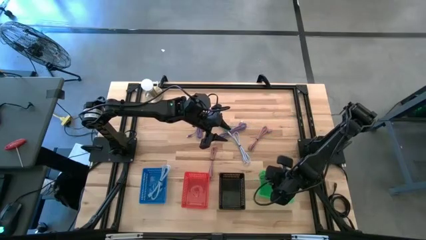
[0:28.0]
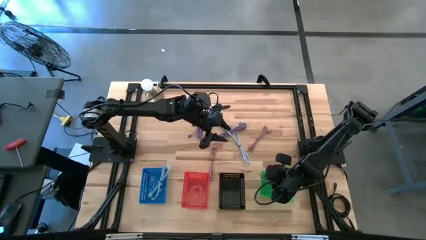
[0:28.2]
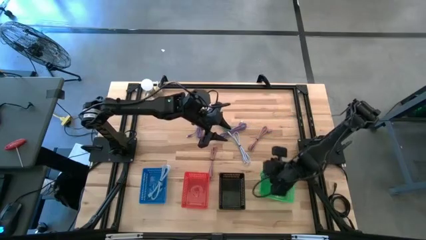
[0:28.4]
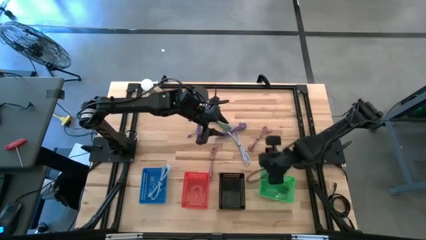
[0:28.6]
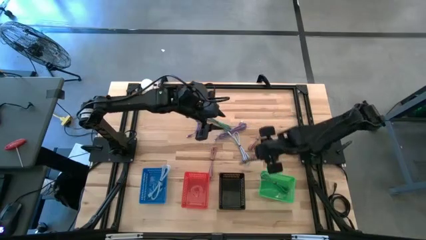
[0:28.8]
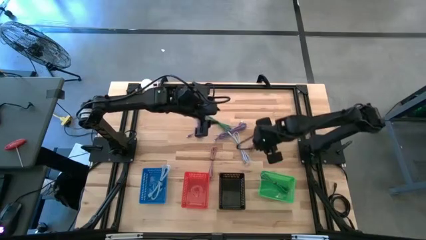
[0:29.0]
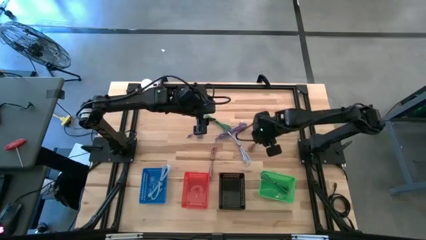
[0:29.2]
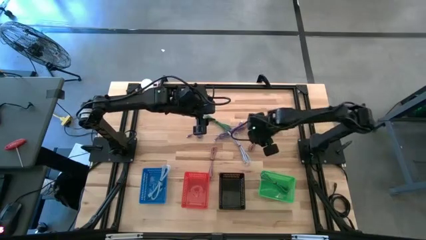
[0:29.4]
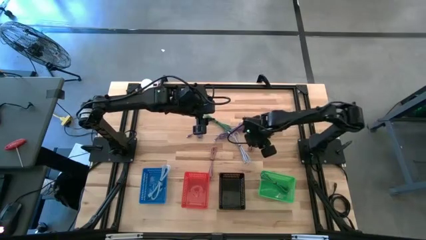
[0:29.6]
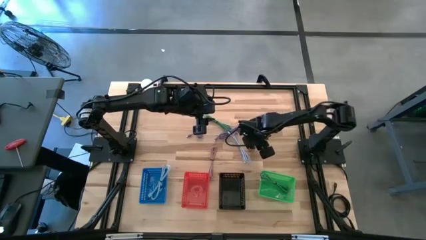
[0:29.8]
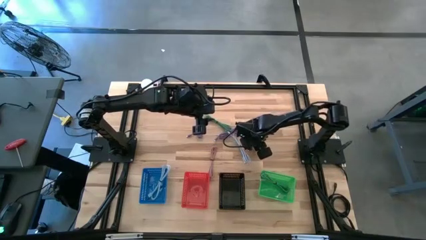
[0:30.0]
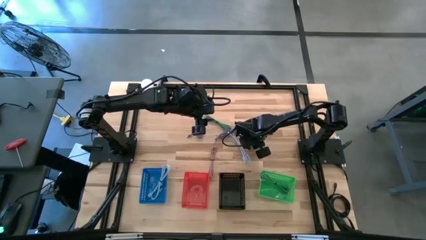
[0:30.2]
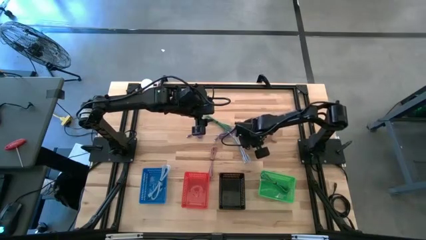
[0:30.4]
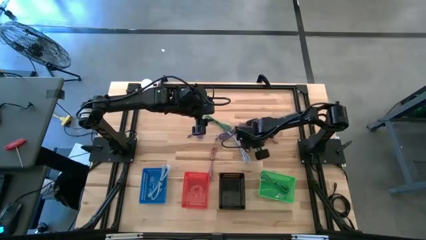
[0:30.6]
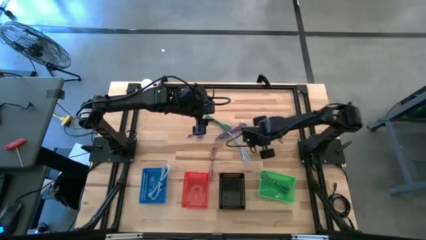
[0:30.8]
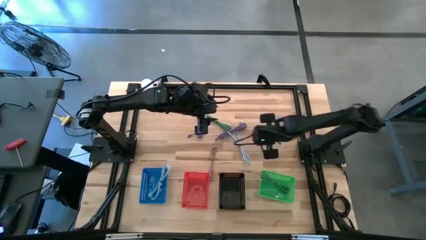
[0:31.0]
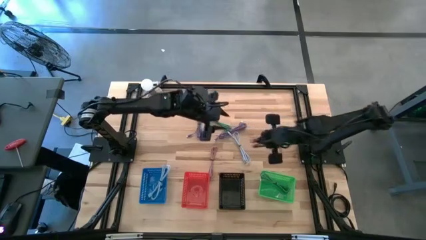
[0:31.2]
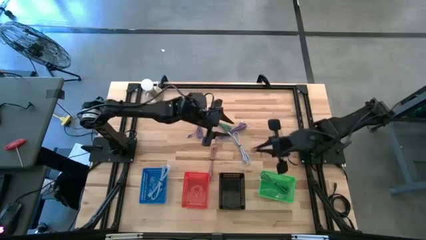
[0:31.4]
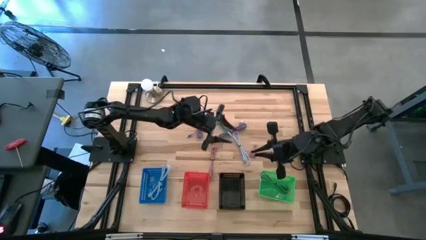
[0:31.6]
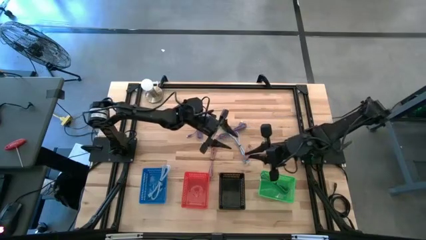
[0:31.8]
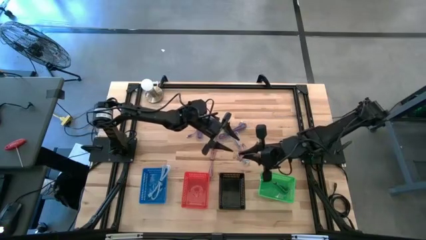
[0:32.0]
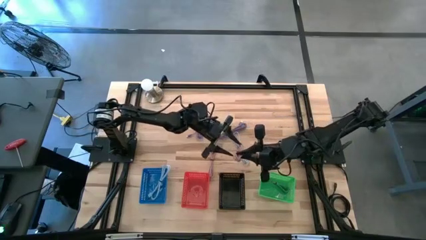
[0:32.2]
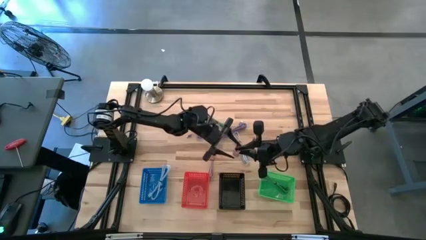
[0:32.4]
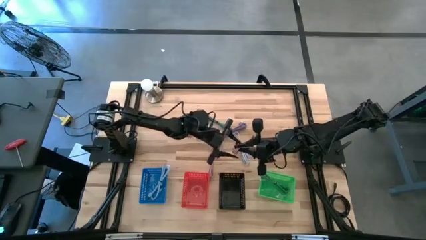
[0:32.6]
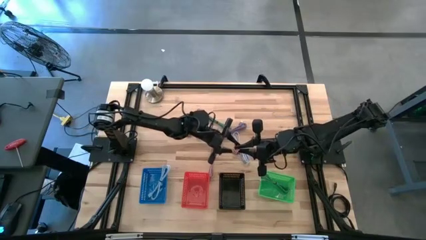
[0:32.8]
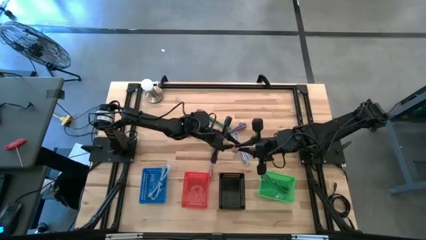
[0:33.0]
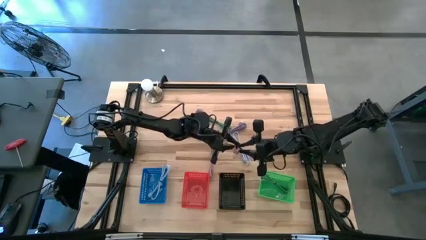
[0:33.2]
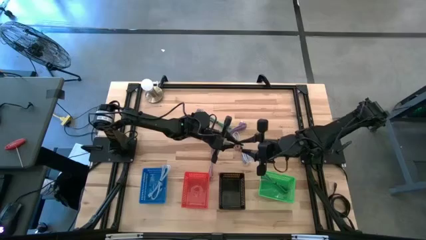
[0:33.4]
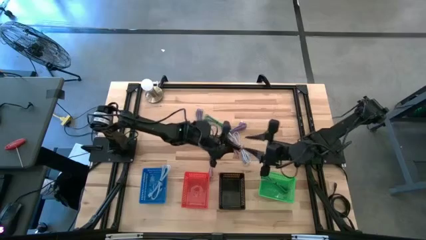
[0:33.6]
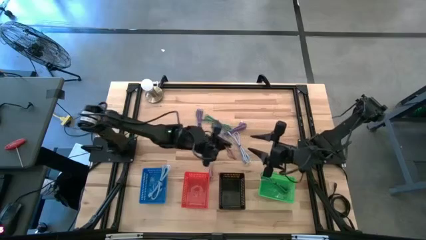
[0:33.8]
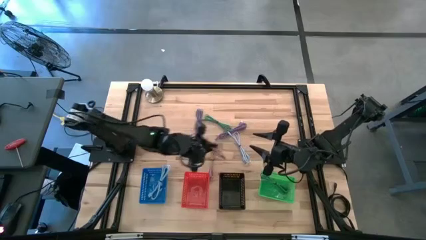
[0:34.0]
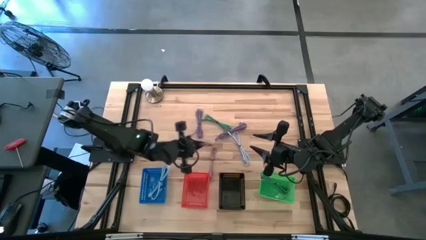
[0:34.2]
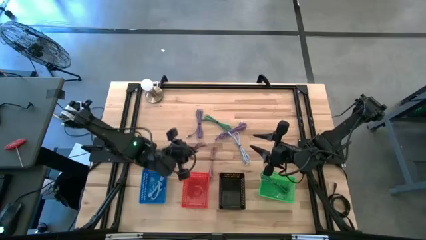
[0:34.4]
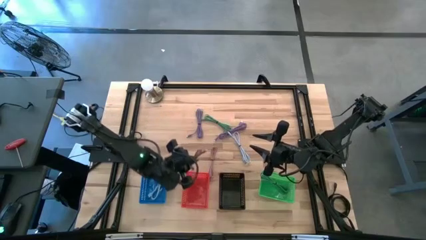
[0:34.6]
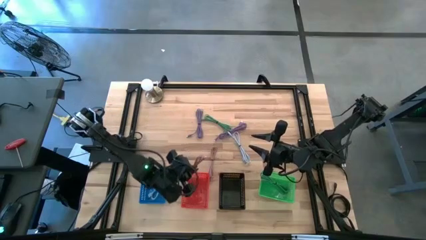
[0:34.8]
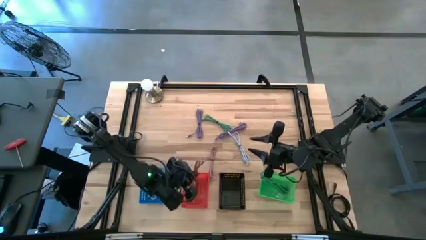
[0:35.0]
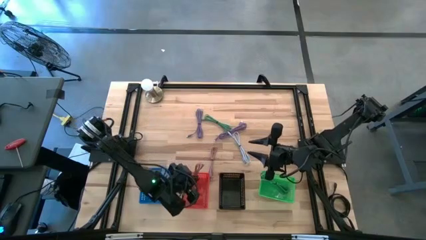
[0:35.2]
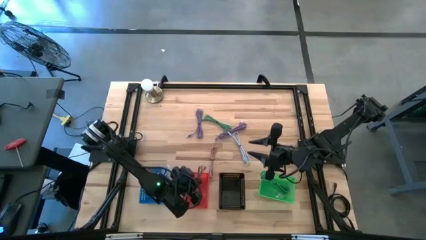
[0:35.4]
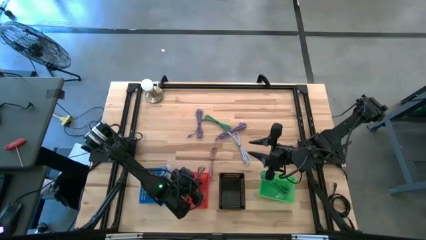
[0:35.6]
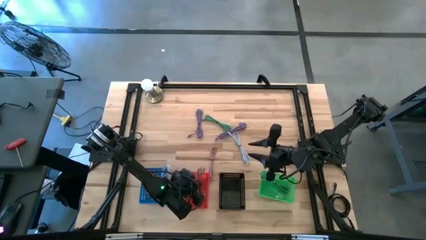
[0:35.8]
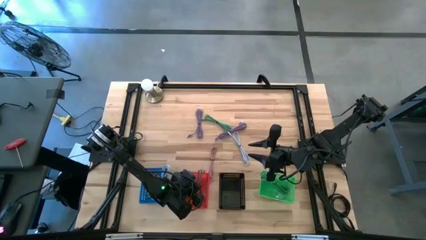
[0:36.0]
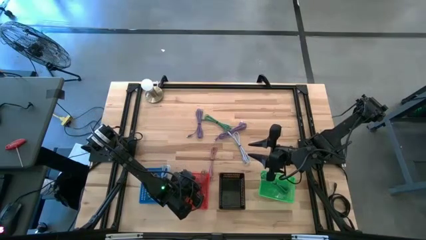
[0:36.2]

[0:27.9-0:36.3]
Task: Pick & Place USB Port
Put the right pink charger cable into the red bin

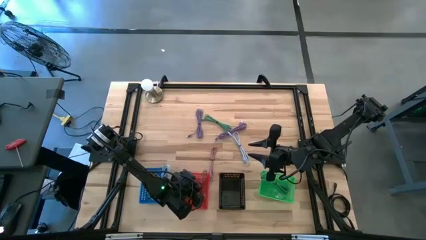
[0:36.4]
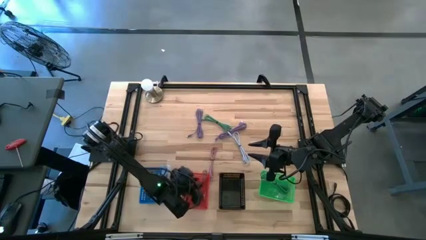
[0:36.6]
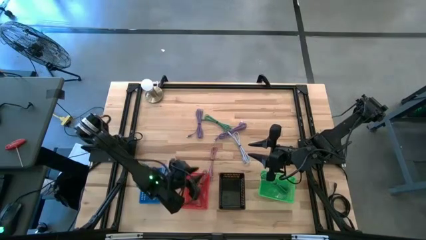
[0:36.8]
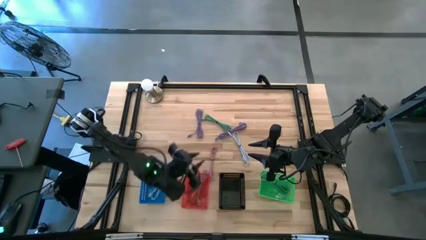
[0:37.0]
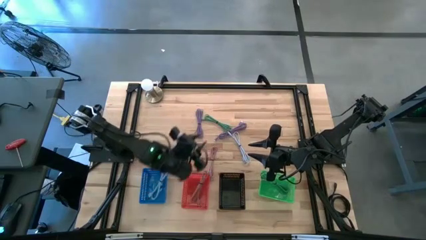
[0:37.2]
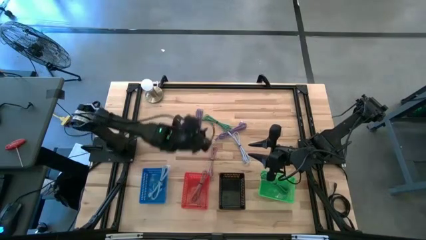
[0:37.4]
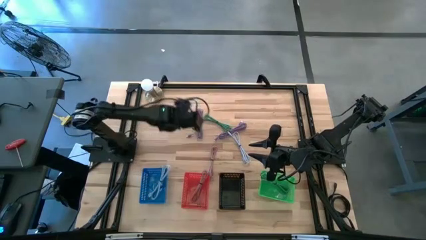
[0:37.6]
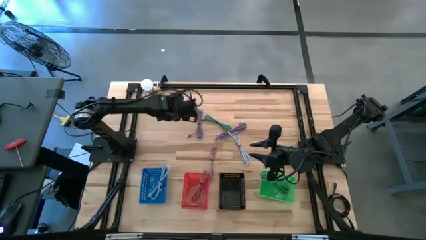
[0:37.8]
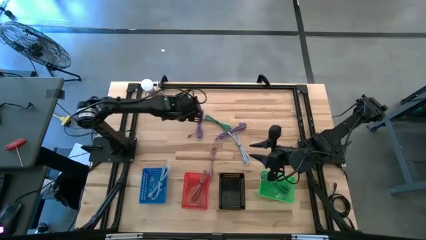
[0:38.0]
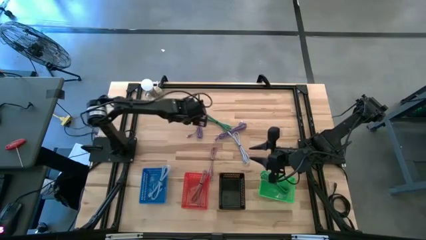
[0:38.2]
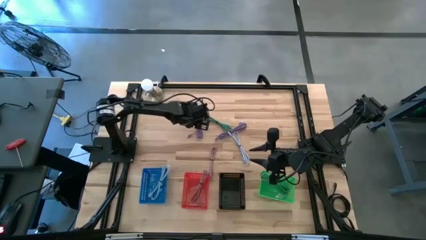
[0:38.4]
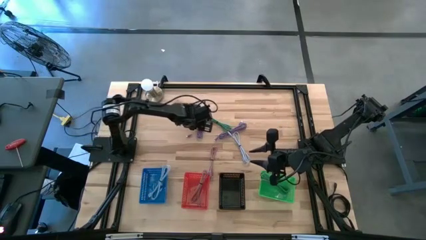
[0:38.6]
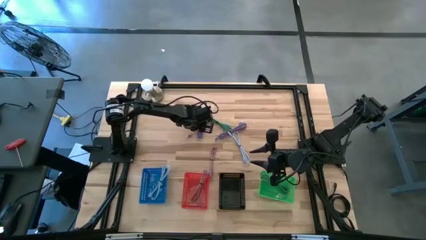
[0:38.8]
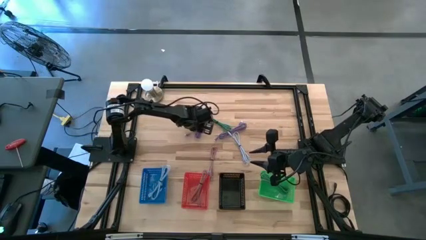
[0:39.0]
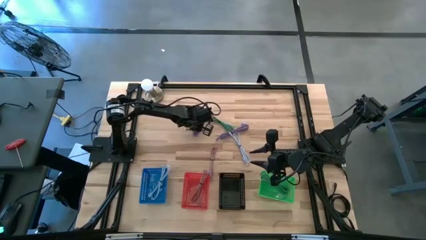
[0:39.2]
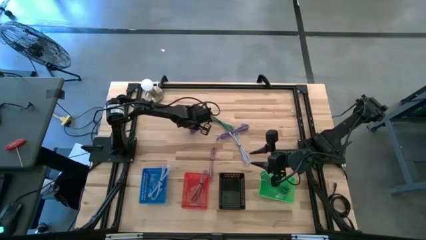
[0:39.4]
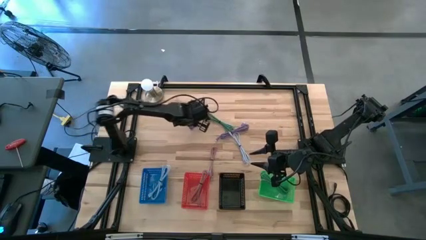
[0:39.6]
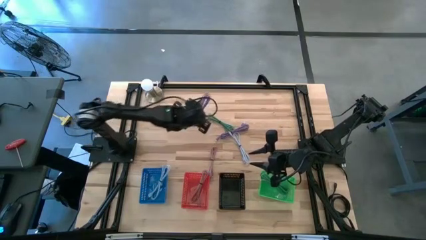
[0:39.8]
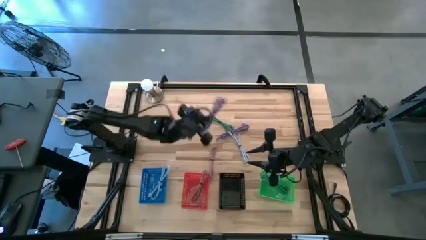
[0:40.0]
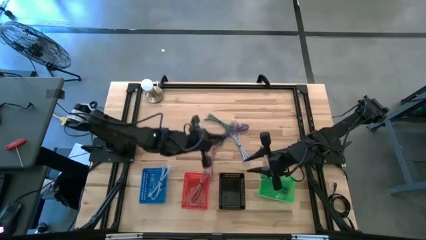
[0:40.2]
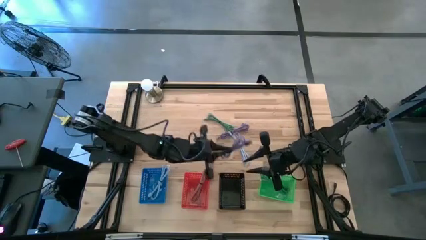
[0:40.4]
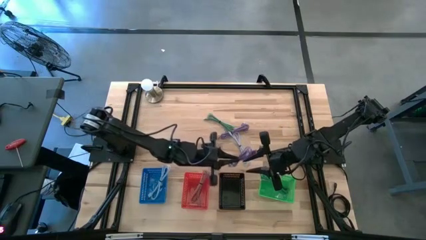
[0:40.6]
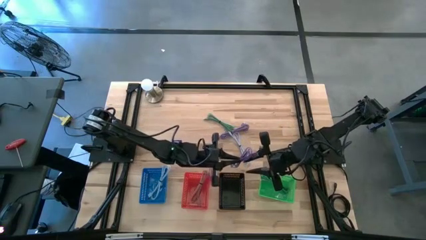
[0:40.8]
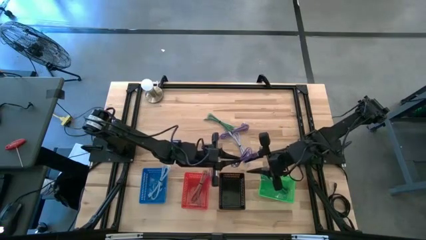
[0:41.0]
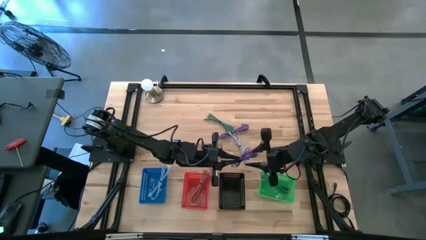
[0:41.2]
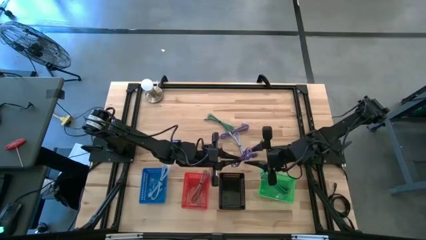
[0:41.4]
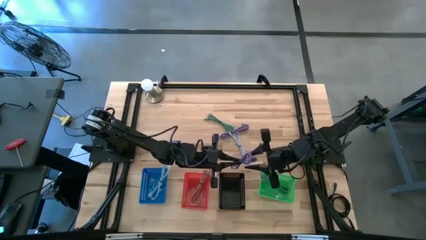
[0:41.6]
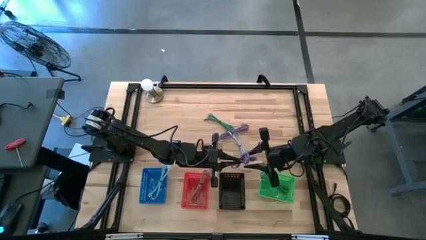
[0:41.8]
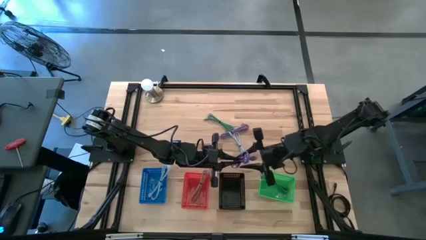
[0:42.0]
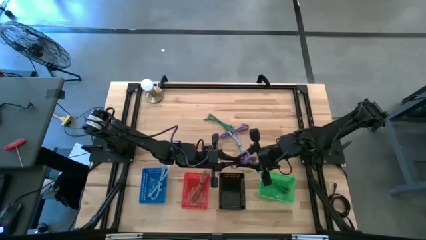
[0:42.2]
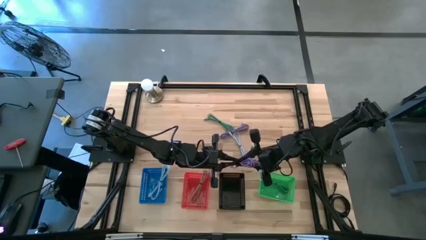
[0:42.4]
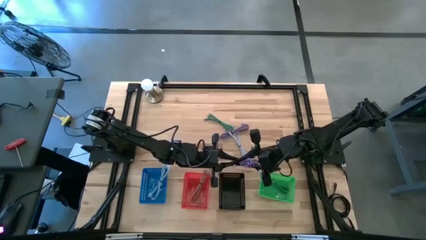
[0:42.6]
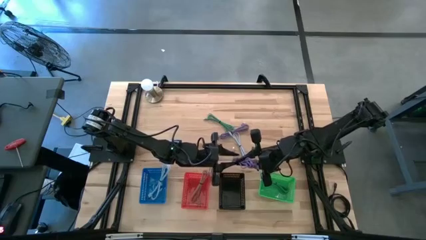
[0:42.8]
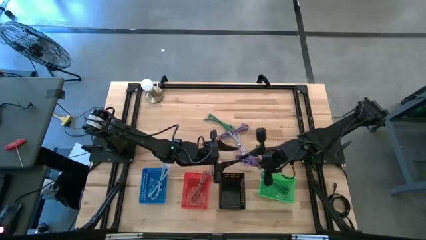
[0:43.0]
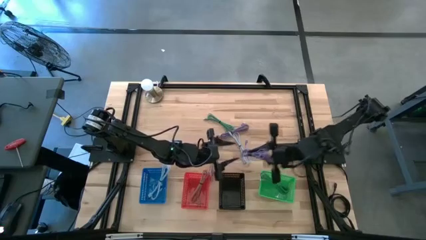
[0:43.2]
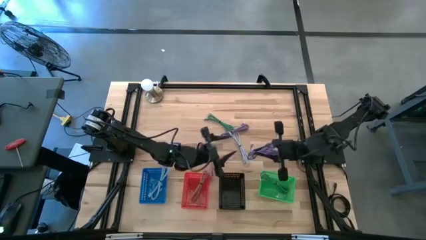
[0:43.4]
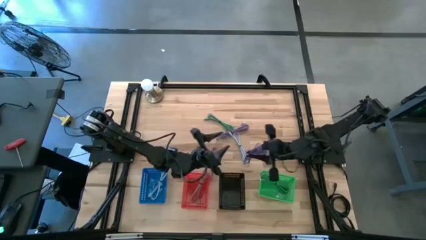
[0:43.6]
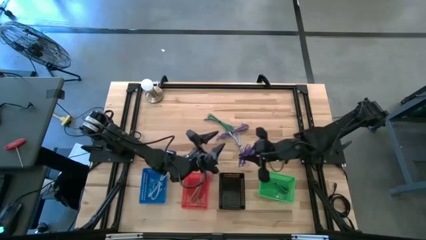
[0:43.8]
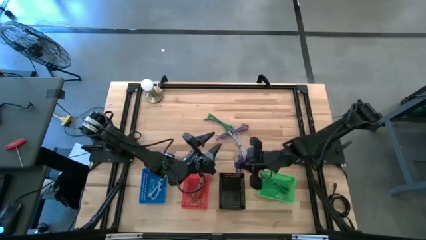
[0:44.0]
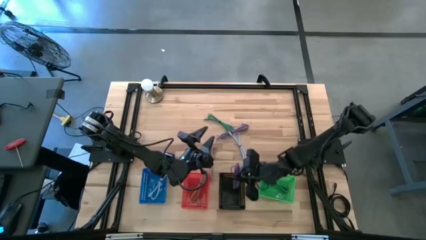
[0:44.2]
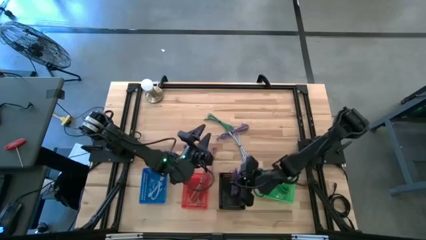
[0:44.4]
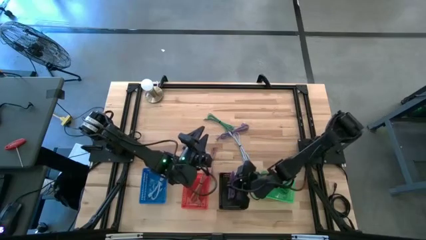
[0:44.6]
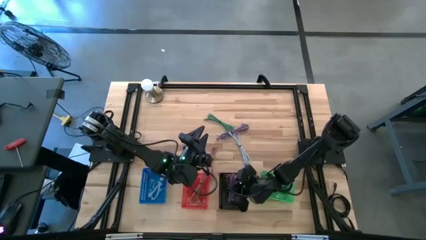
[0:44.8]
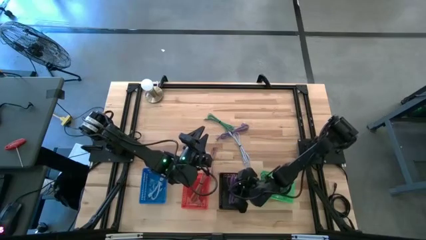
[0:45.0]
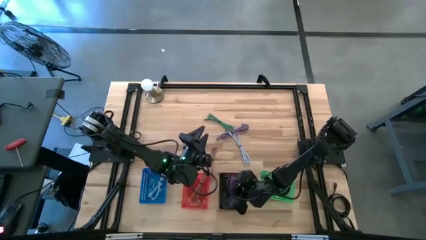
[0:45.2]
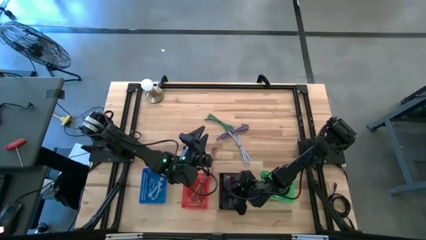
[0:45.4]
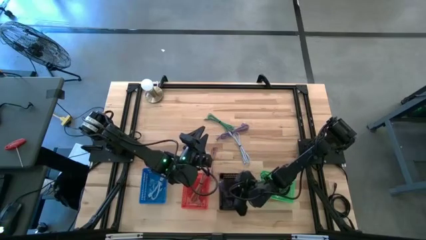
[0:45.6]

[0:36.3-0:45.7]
Put the left violet charger cable into the black bin
